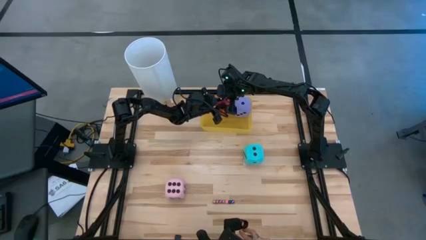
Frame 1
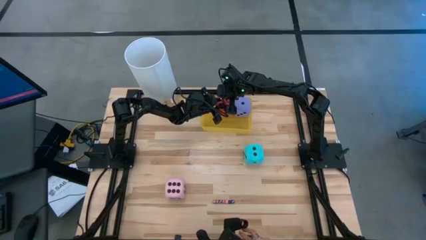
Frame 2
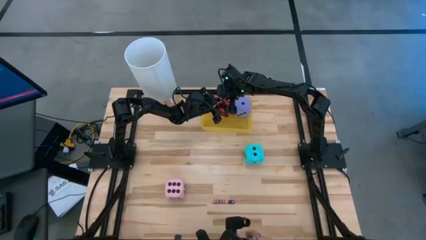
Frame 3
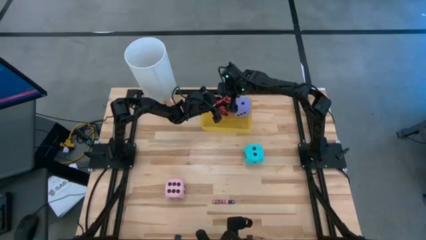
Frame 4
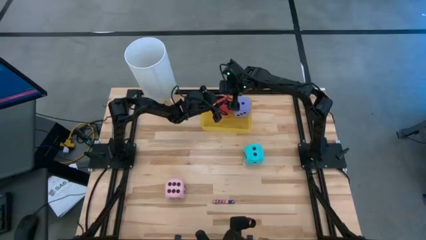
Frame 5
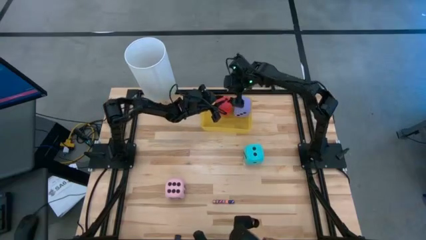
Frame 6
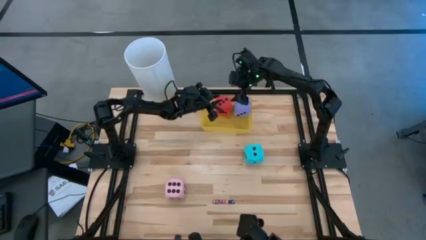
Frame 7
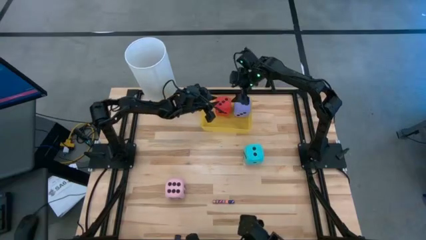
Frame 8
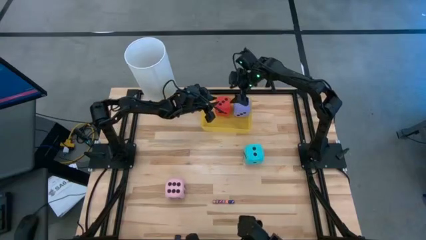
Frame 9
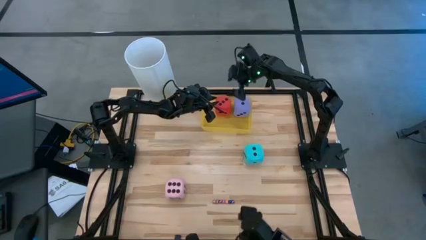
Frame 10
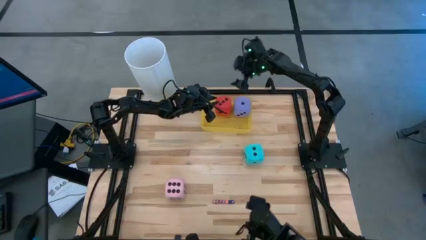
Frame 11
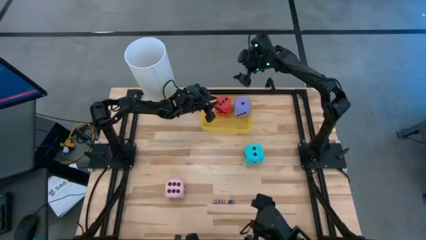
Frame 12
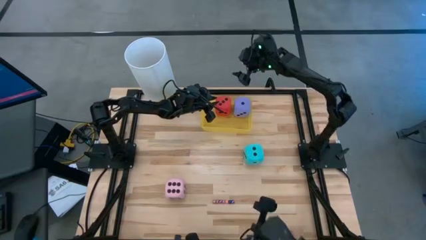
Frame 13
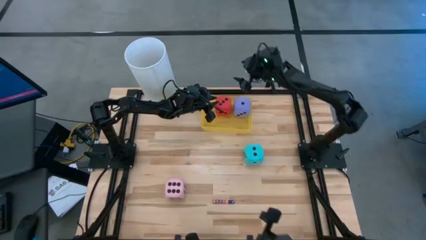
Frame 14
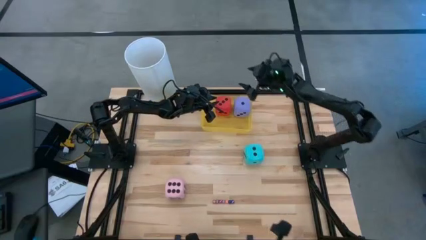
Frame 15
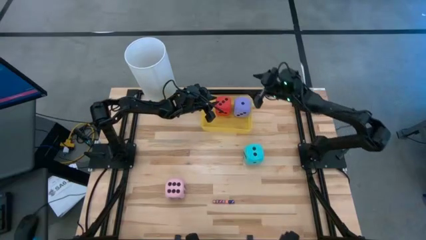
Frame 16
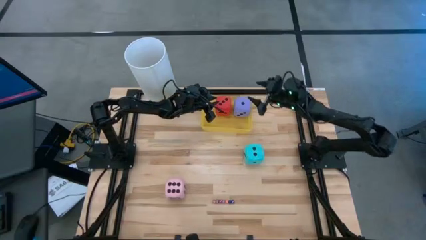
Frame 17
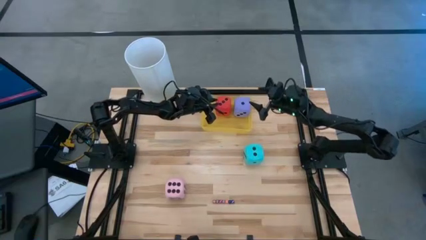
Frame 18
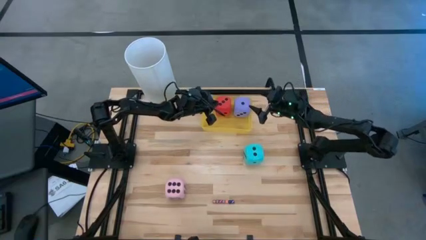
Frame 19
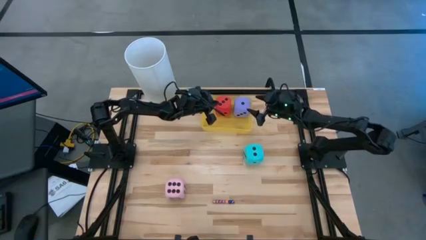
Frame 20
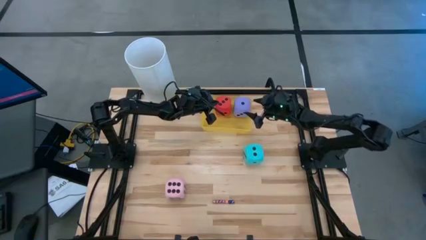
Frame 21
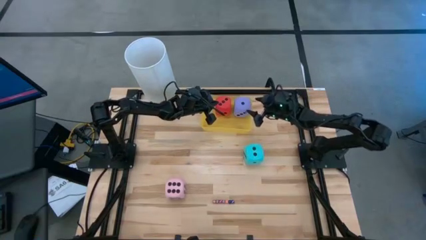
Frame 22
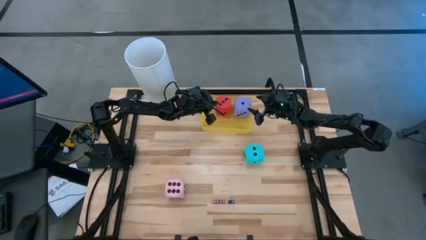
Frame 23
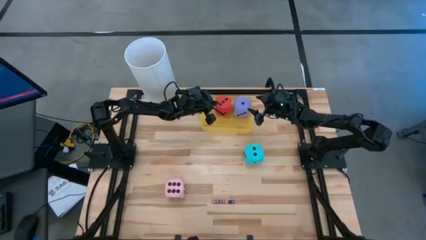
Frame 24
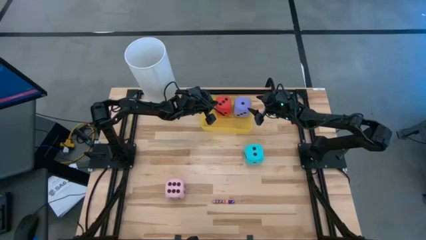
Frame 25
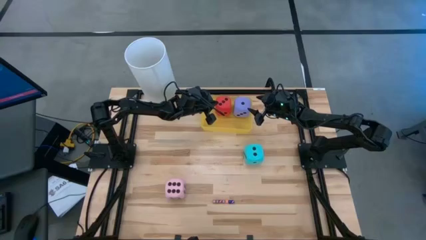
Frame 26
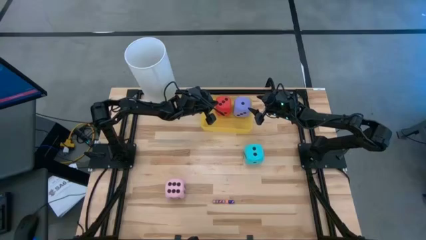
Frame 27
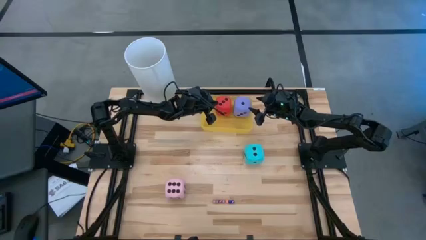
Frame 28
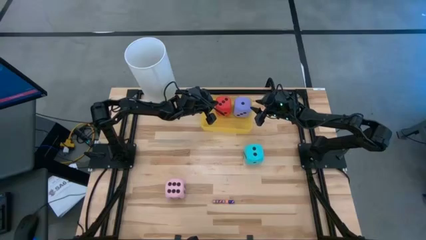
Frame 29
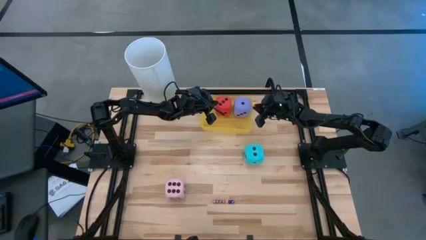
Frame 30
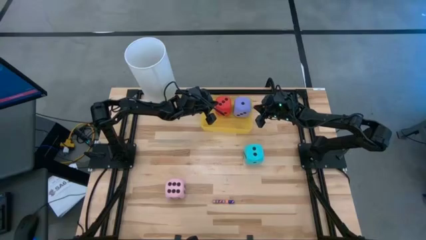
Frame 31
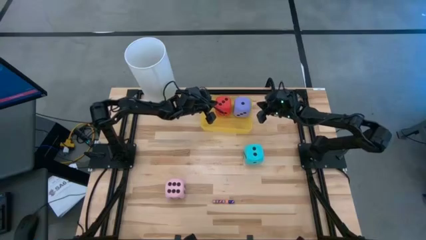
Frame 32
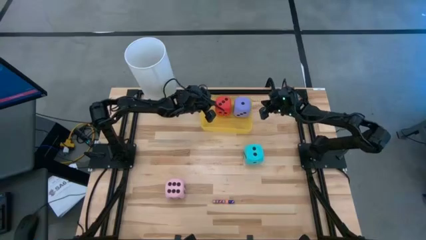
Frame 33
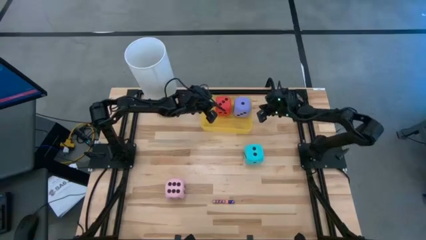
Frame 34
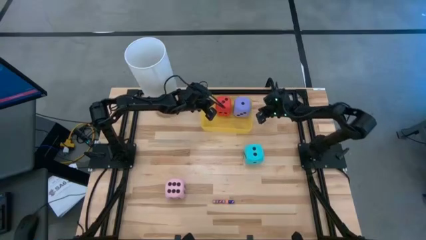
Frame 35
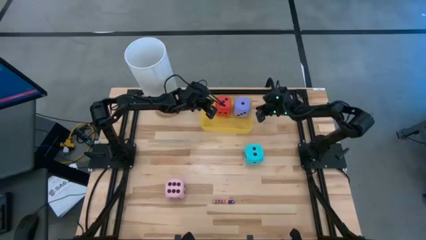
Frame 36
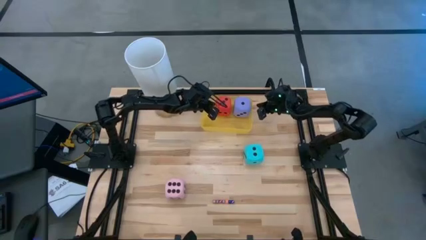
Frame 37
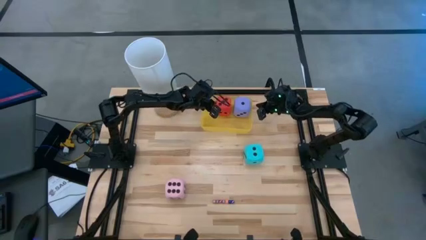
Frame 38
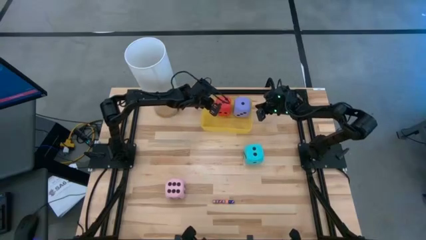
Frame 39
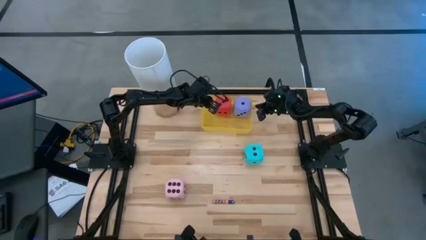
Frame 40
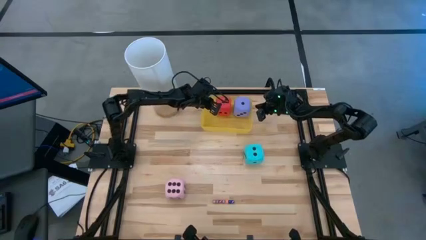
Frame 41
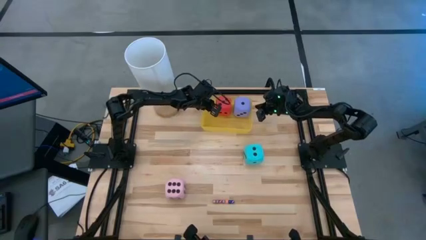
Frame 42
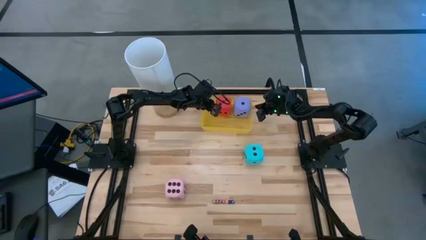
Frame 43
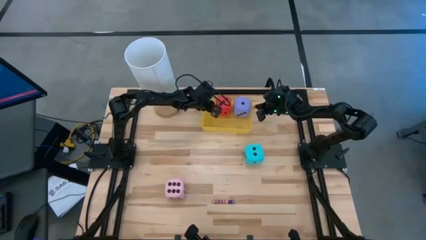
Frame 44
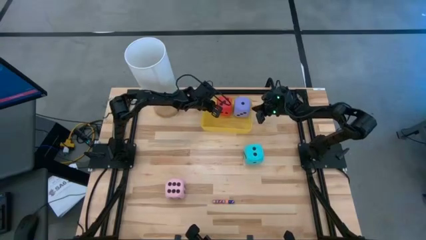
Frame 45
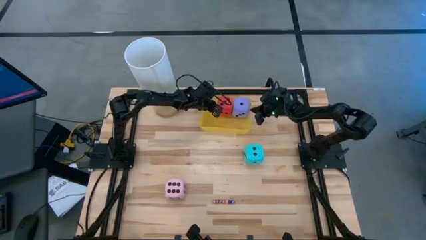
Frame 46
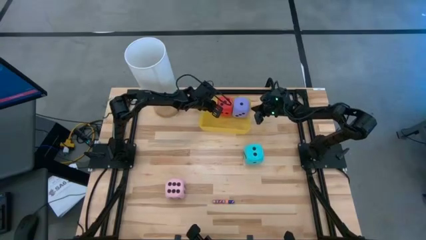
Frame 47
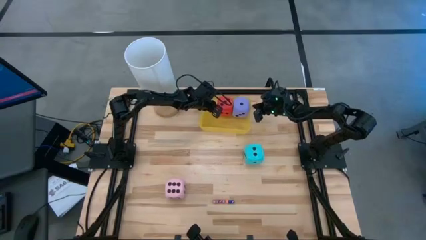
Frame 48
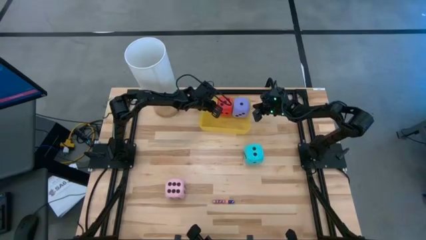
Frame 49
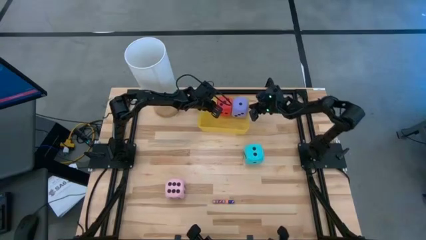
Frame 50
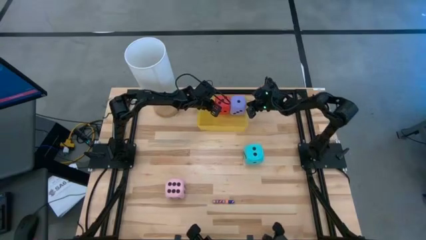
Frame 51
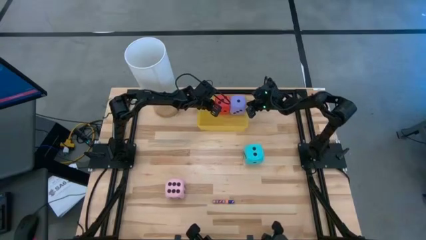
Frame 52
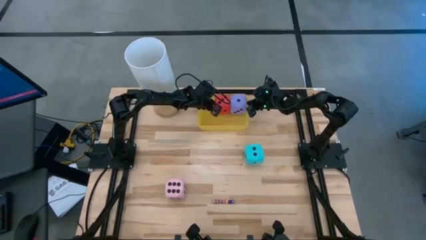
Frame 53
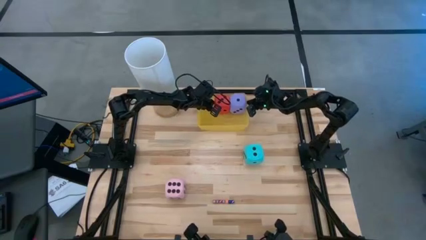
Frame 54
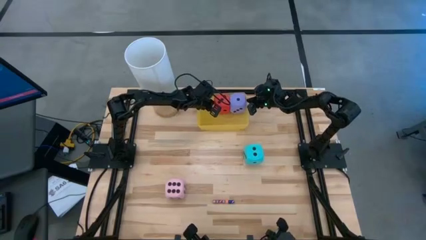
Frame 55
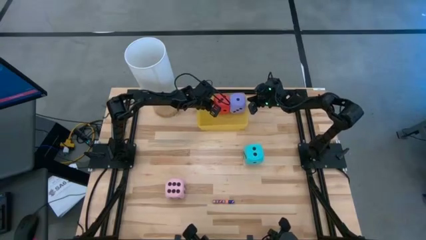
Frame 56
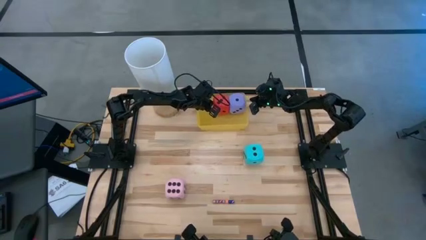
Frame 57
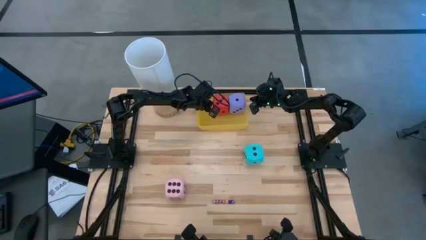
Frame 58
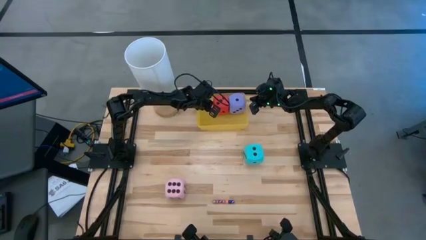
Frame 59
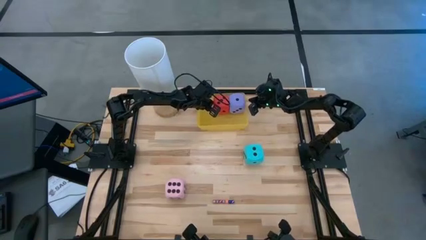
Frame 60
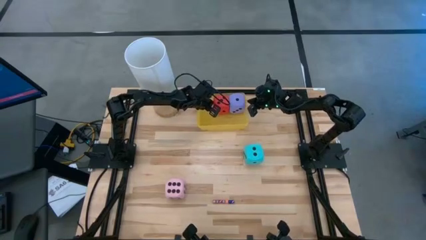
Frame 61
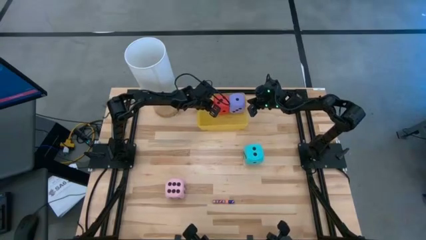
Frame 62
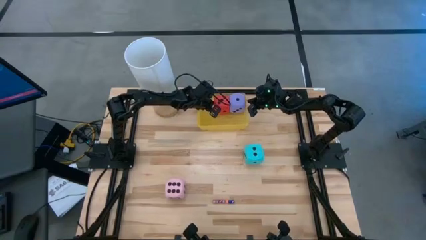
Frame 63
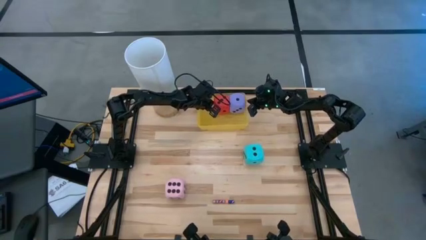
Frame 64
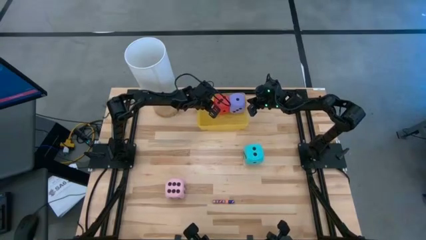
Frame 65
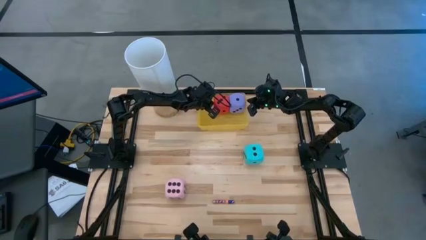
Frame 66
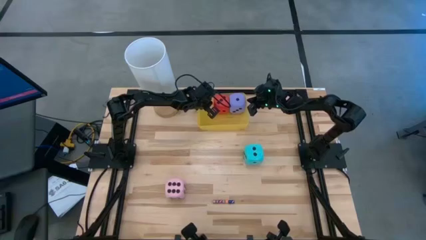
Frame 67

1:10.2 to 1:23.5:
Task: Pick & Place Dice
Adjust the big red dice in the yellow bin
